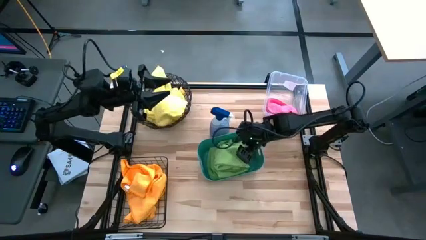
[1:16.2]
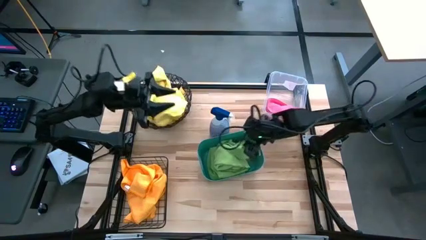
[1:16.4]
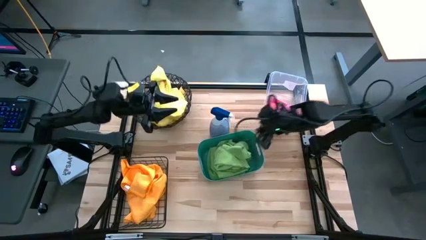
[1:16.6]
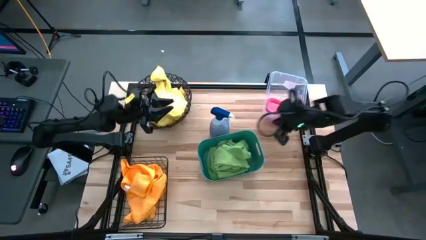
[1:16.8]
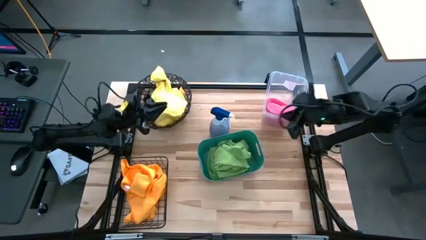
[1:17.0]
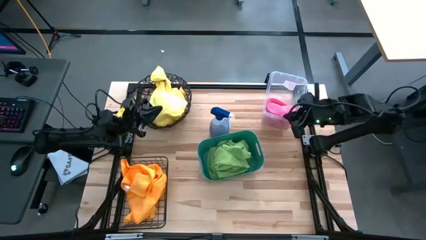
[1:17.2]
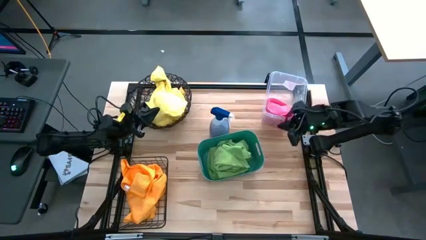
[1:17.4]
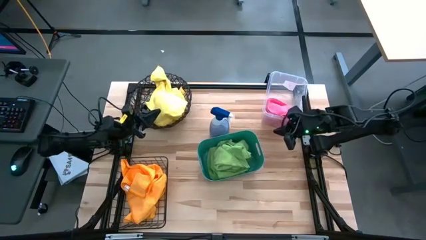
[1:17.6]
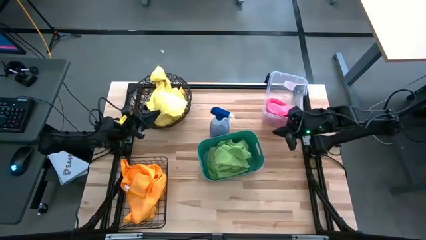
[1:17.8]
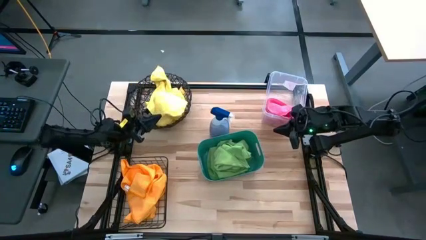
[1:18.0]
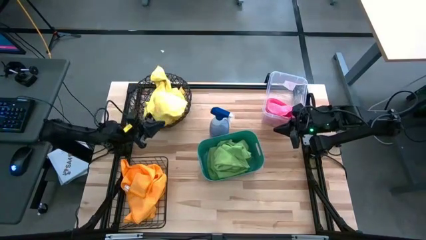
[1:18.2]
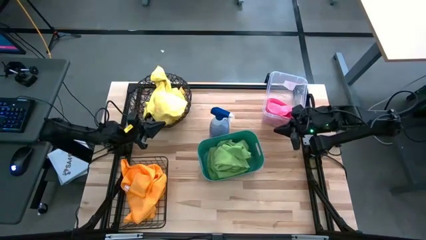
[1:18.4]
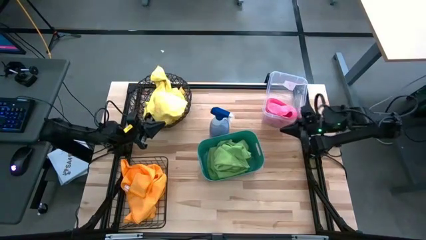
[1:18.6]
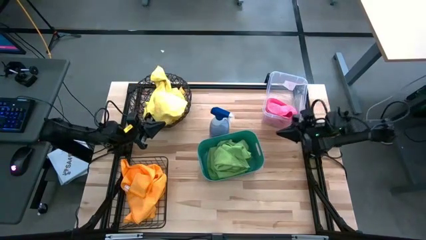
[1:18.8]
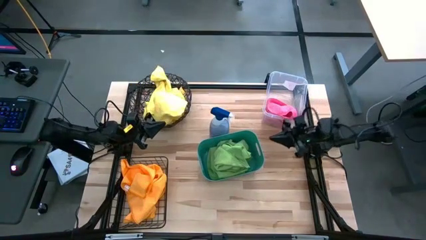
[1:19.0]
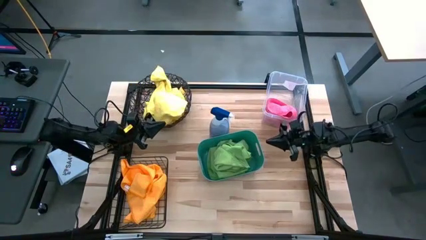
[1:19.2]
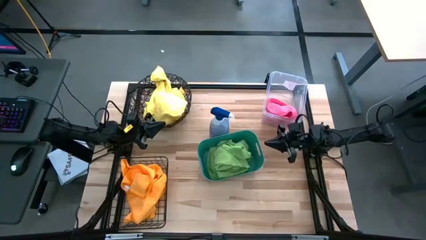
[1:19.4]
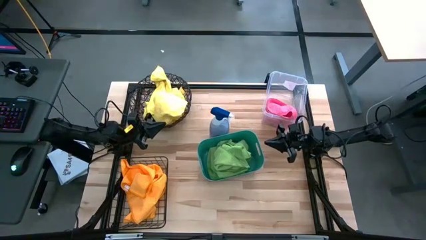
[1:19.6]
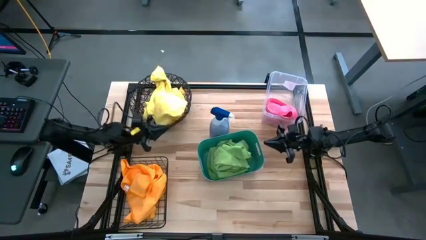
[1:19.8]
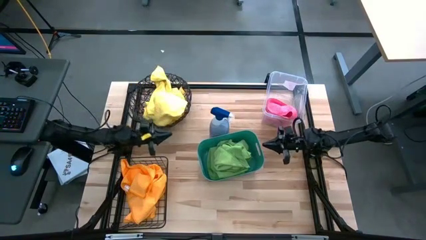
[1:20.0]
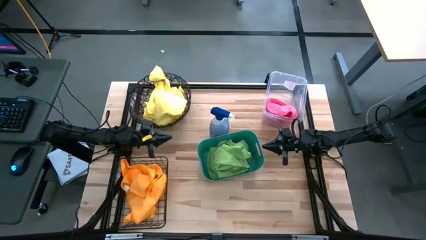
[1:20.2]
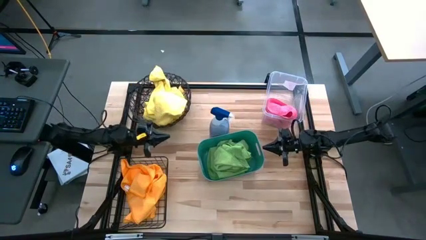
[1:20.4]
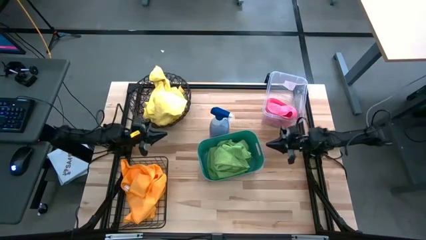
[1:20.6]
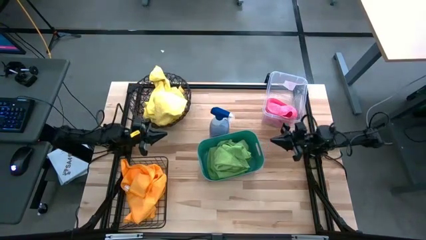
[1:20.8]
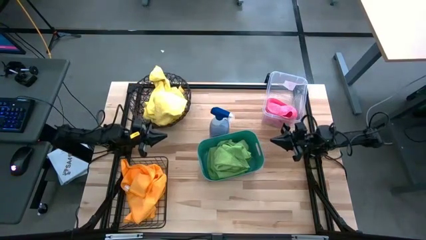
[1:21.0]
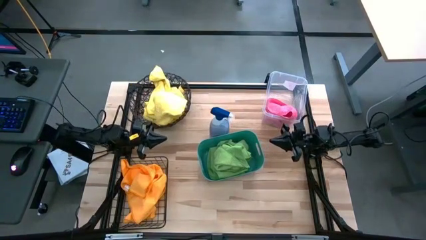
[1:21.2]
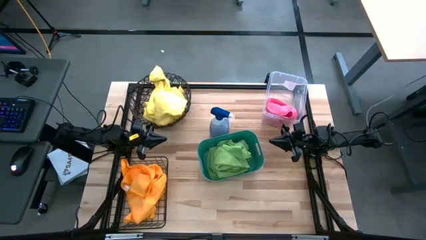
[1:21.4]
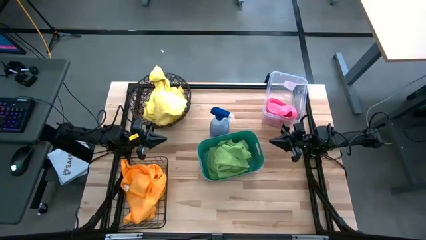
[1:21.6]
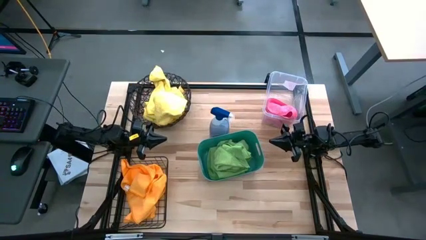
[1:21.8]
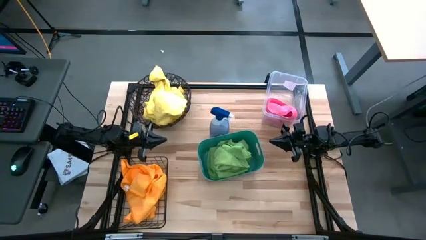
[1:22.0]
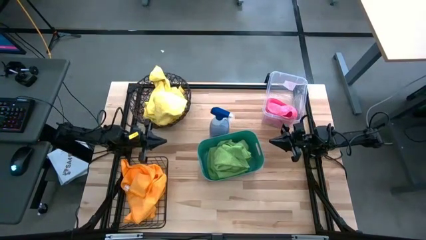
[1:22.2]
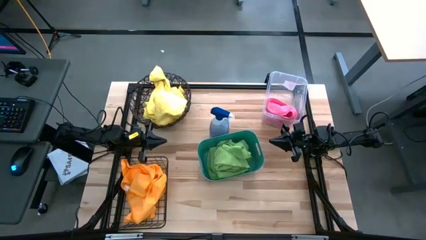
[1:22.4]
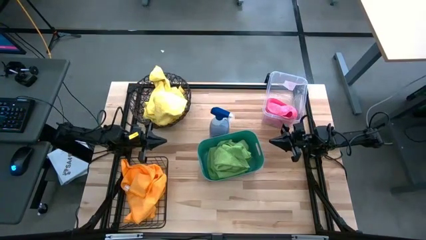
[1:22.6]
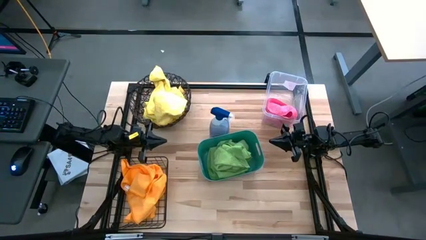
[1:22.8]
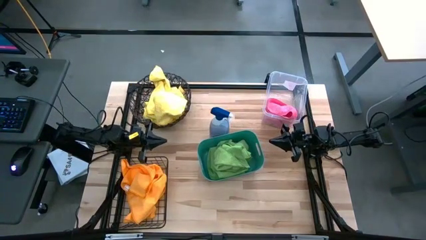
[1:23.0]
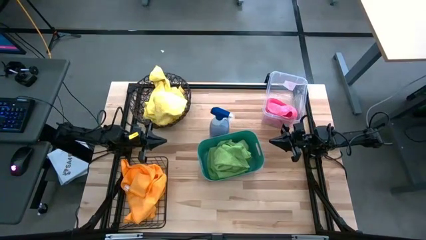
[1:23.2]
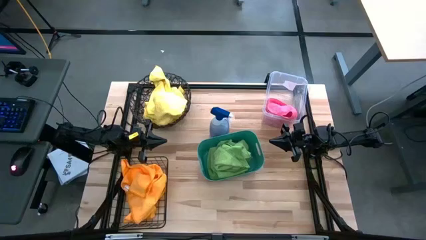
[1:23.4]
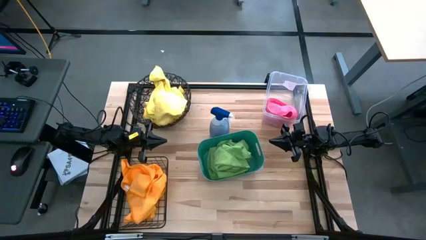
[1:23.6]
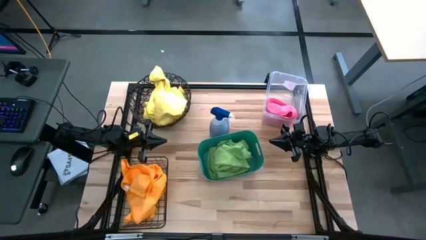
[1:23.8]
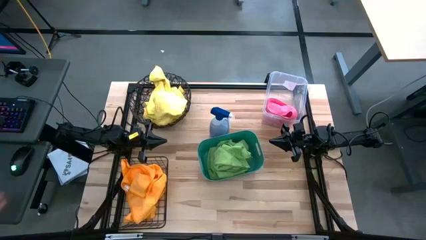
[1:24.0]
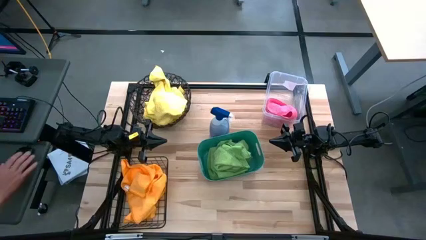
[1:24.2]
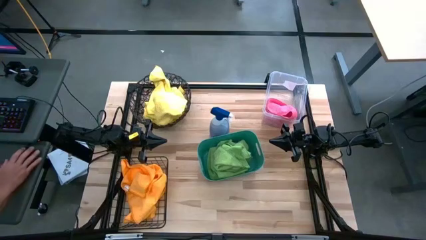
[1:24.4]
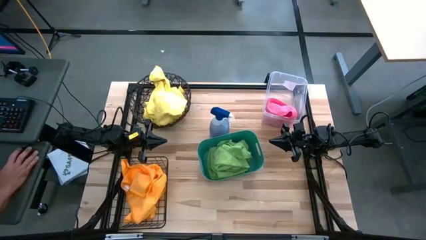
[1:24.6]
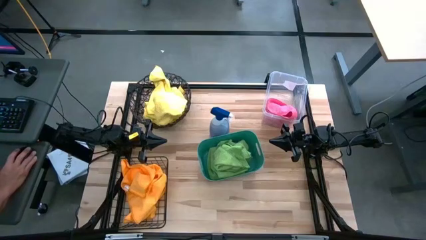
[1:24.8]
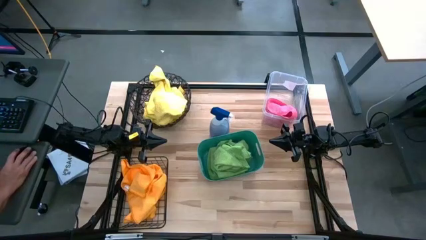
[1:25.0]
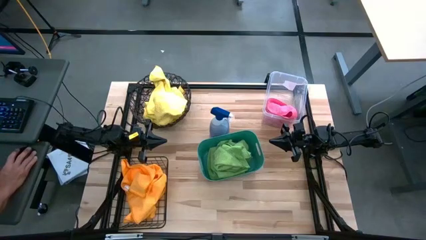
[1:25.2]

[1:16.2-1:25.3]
Task: Sort microfiber towel by color & place in baskets
Return to Home Position

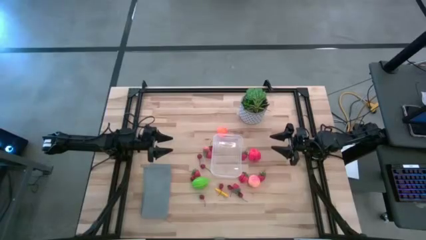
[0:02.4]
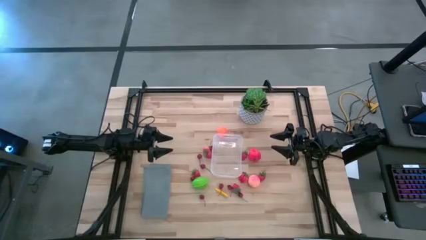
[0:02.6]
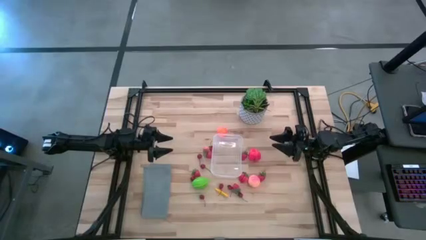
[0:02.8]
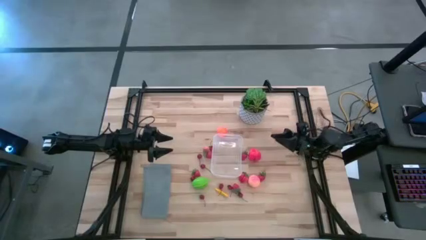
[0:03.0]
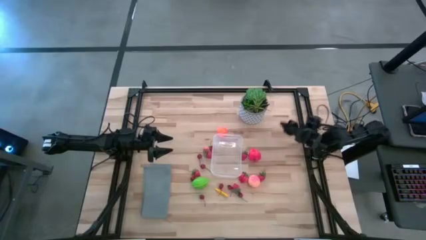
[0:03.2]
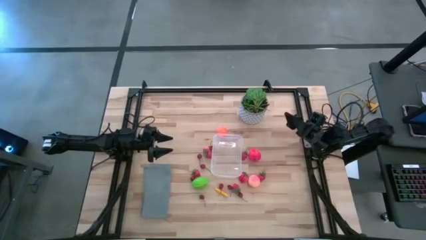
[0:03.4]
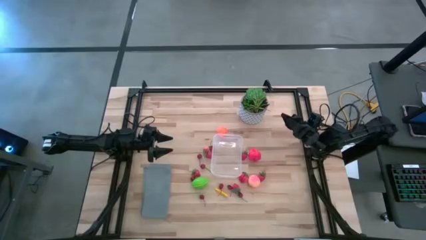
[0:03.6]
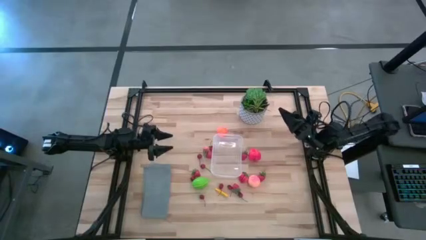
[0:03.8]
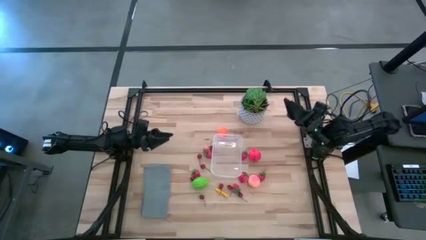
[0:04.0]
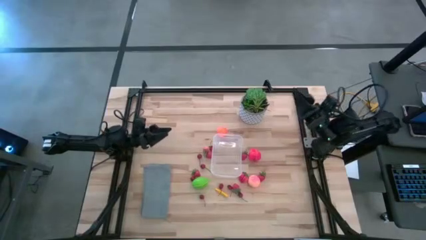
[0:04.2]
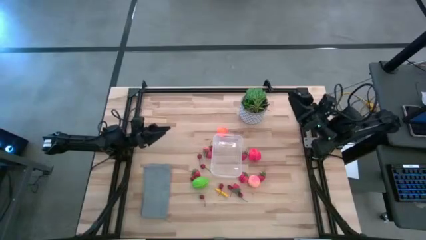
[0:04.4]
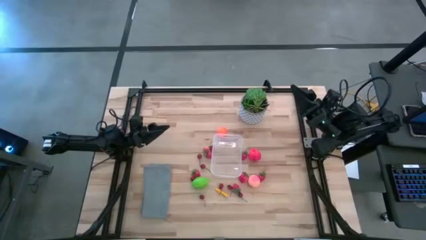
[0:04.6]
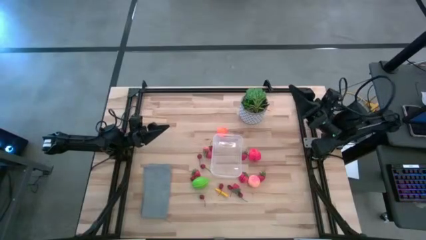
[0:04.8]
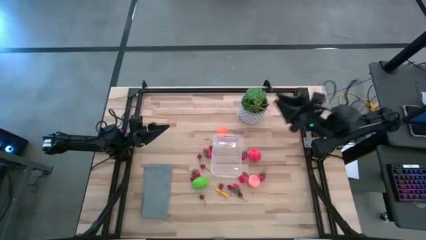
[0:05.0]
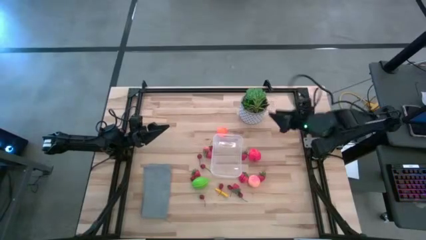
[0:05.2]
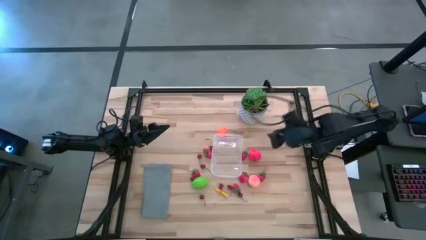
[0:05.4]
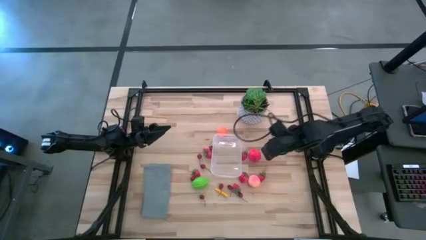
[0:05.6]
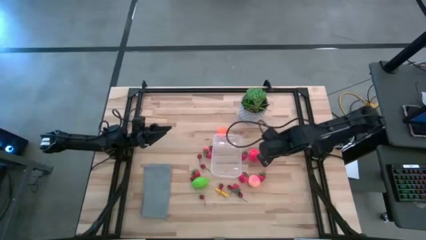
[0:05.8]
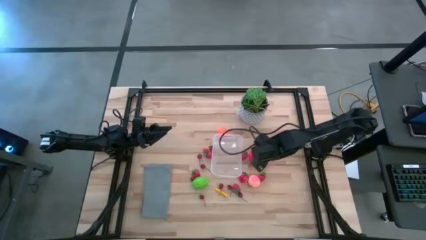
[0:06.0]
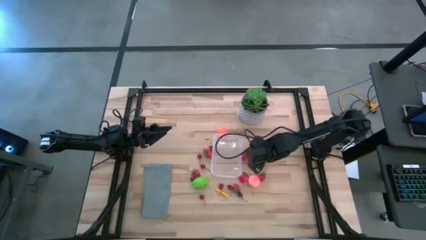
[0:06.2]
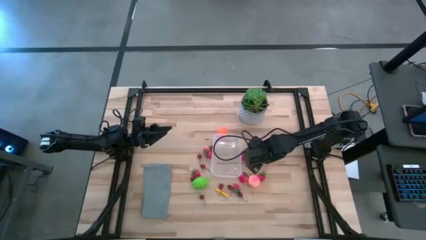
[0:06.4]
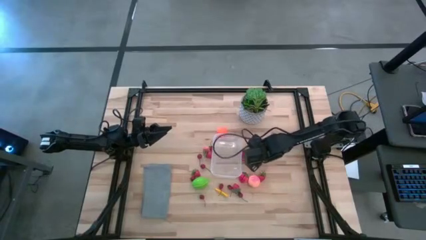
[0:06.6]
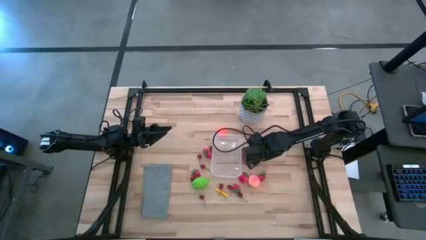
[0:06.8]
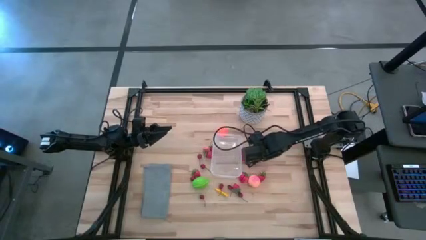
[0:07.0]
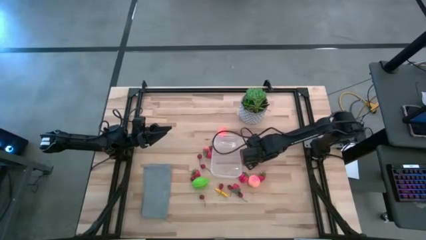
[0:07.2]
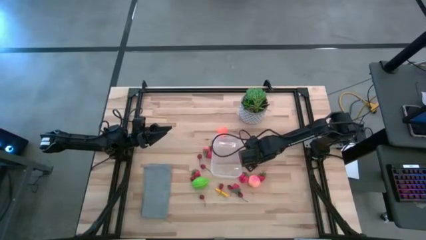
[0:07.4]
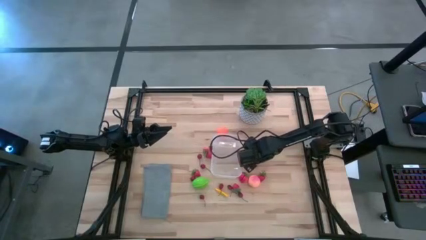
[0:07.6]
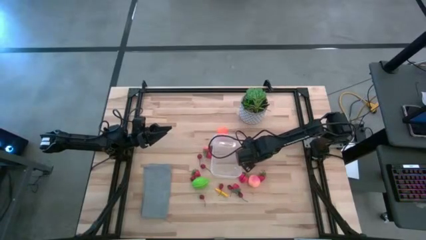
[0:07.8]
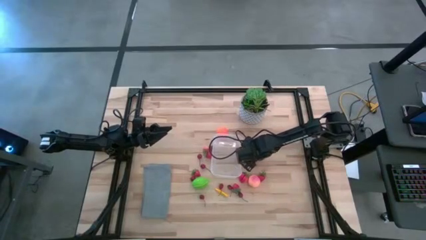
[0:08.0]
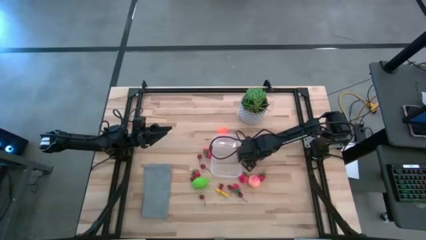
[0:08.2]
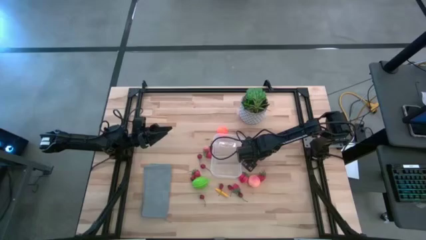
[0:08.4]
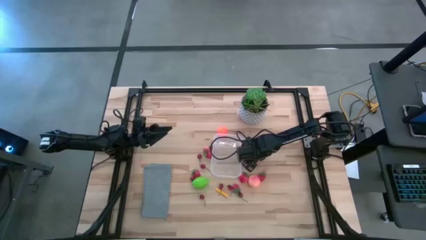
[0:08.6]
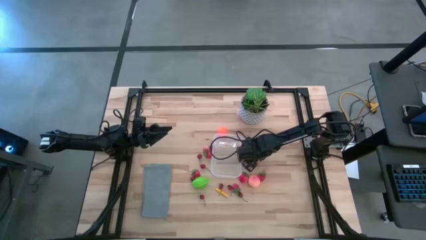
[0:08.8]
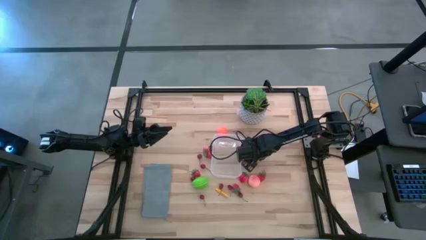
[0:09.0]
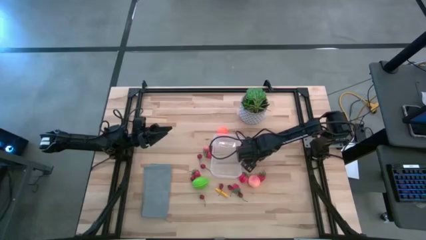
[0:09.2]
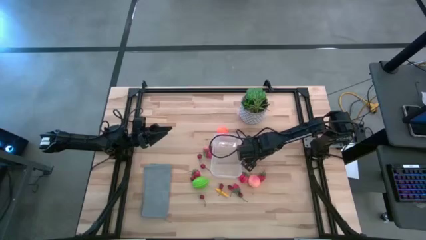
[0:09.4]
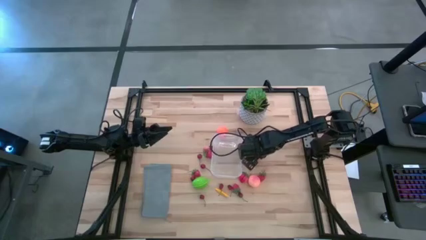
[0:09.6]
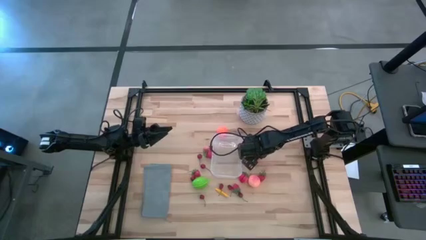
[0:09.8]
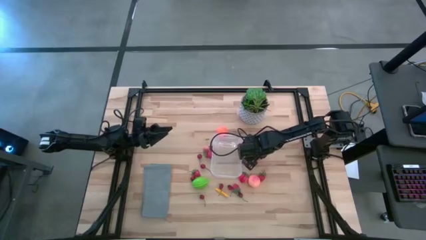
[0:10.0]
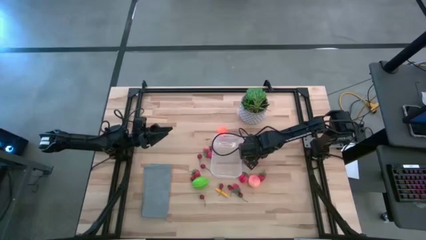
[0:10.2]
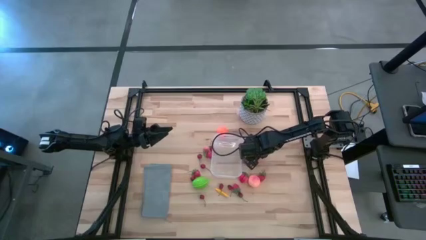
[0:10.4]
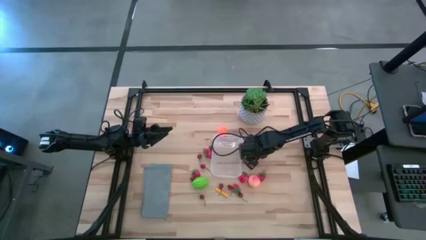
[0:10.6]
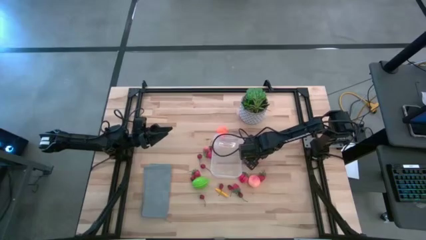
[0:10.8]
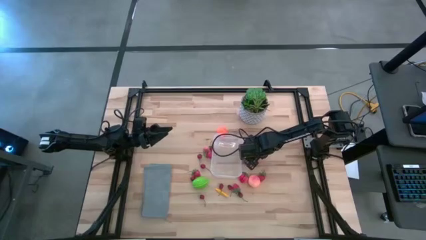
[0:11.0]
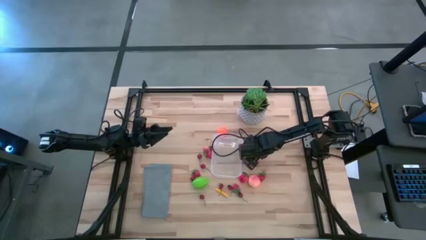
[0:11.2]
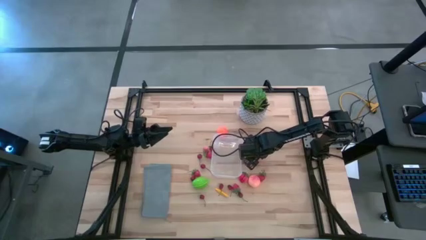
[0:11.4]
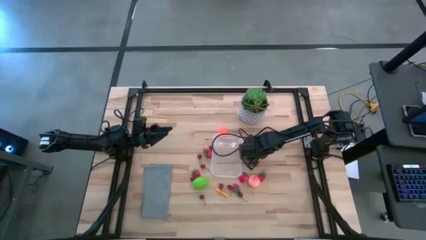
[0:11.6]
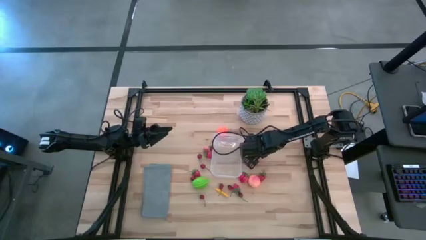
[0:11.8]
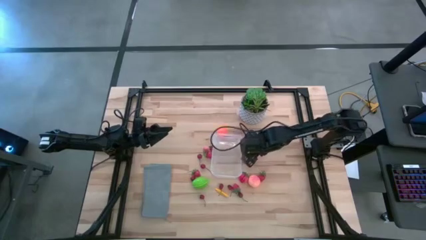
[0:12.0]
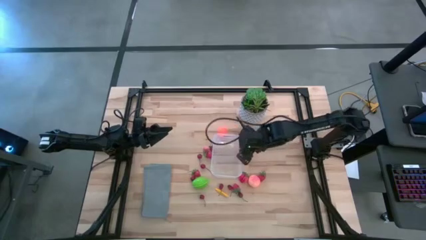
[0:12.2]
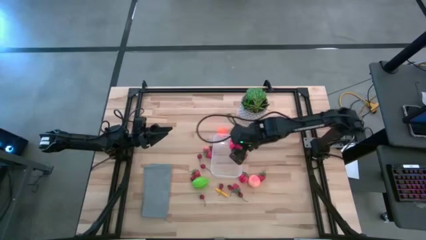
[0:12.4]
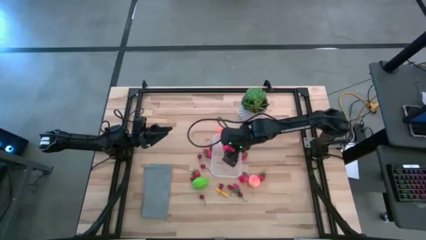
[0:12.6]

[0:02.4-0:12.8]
Task: Pick and placing Produce into tupperware
Put the red apple into the transparent bin
